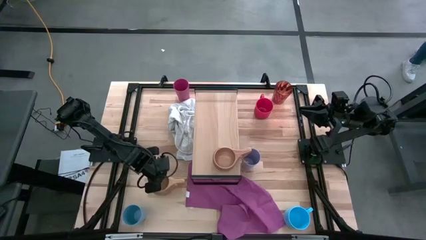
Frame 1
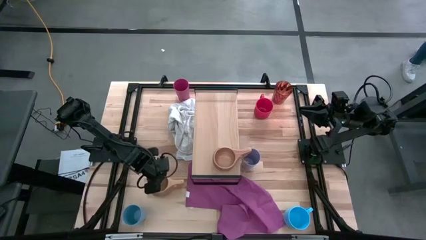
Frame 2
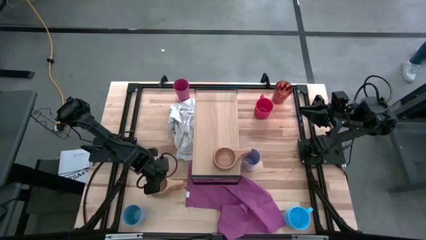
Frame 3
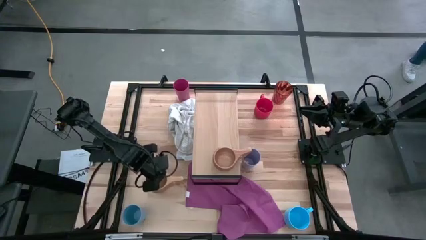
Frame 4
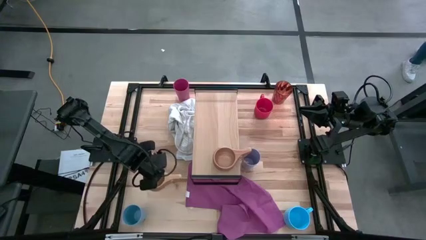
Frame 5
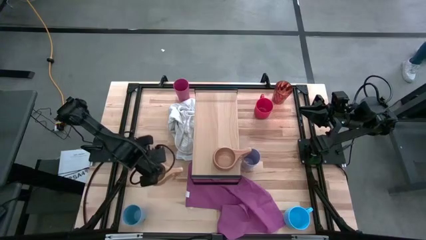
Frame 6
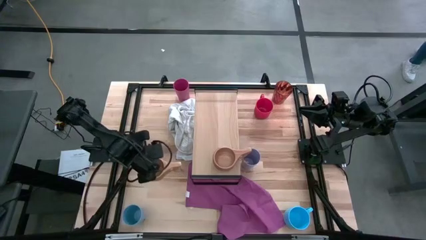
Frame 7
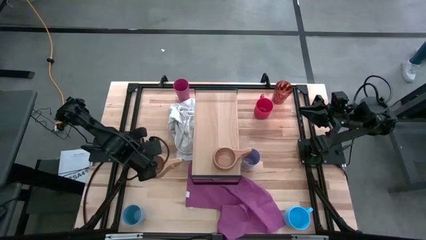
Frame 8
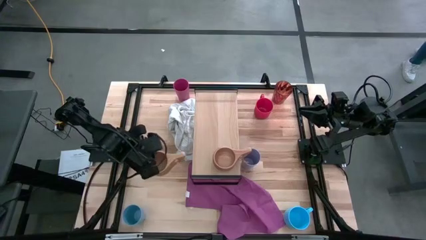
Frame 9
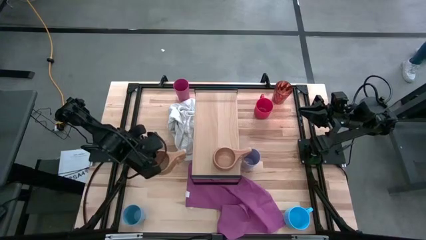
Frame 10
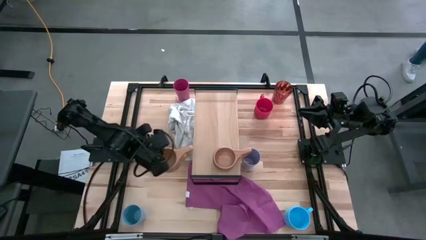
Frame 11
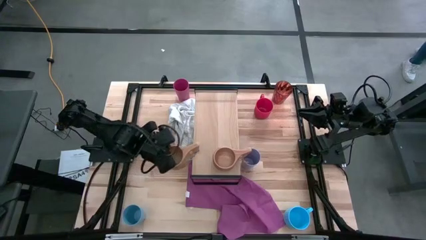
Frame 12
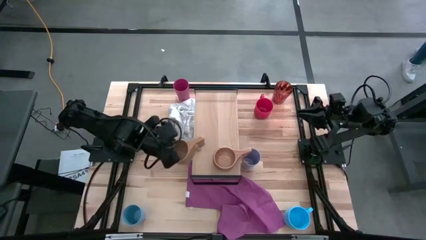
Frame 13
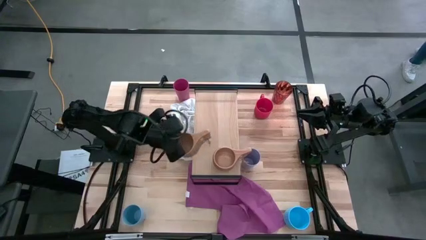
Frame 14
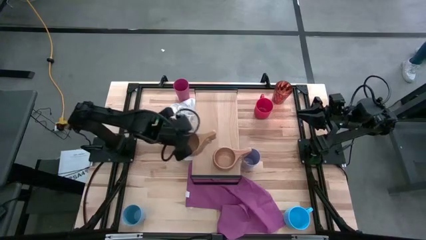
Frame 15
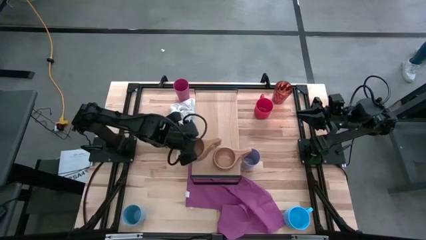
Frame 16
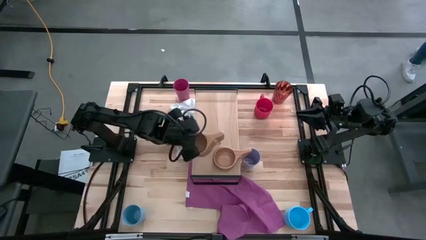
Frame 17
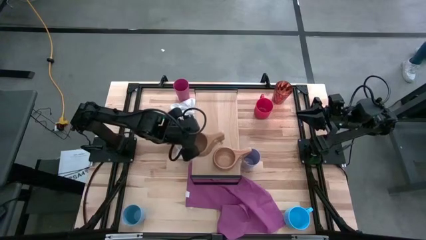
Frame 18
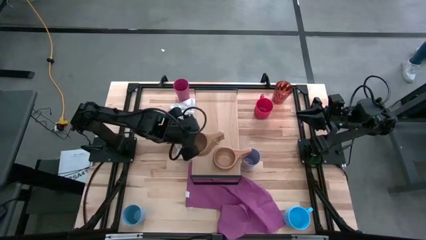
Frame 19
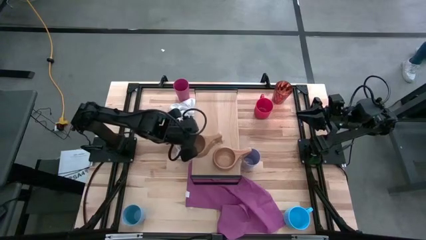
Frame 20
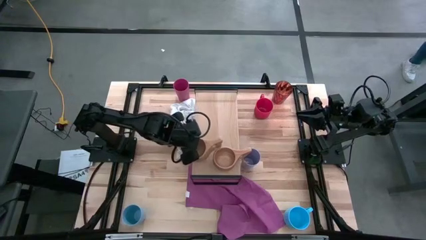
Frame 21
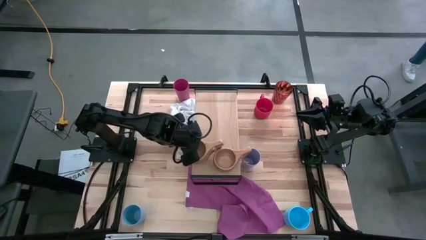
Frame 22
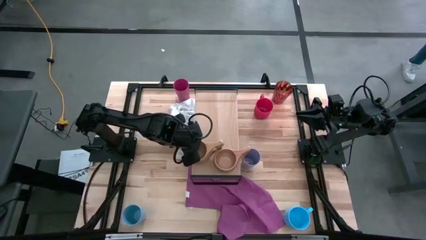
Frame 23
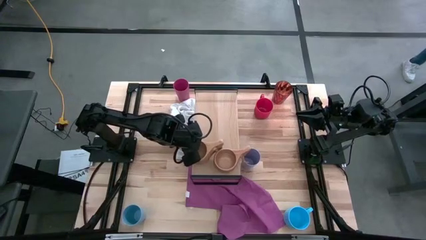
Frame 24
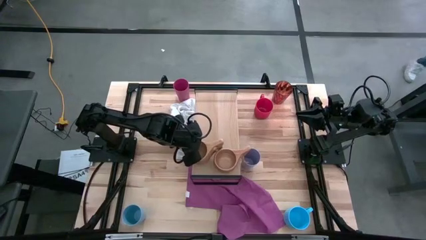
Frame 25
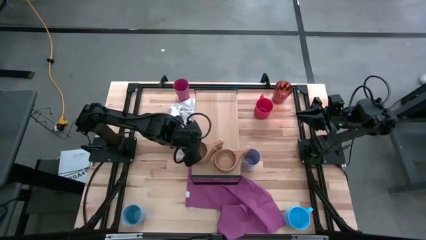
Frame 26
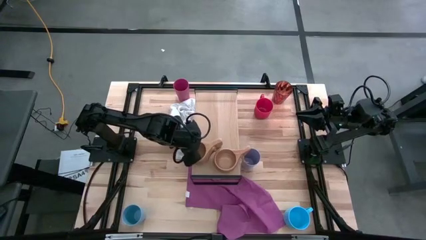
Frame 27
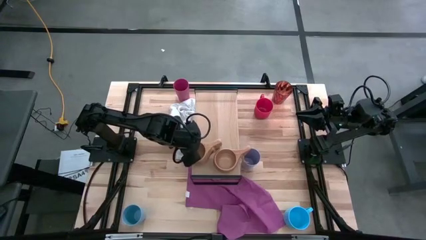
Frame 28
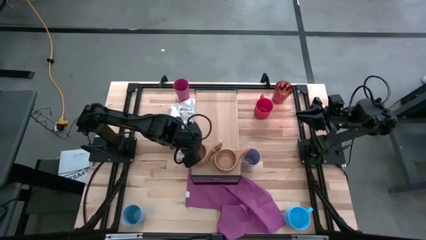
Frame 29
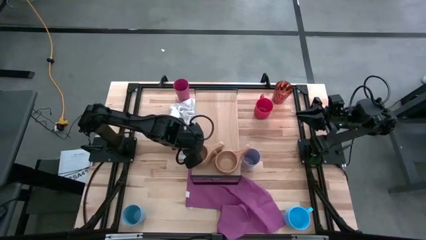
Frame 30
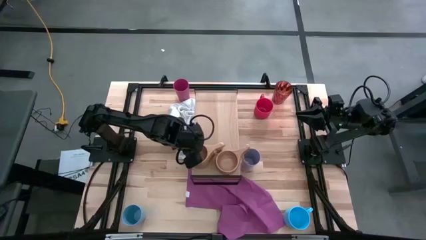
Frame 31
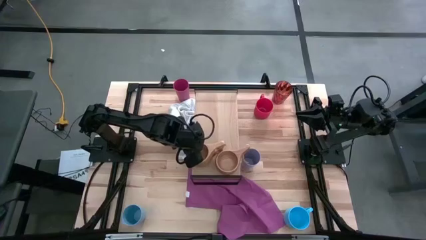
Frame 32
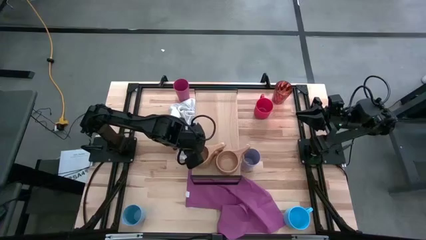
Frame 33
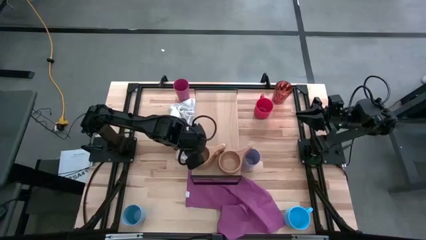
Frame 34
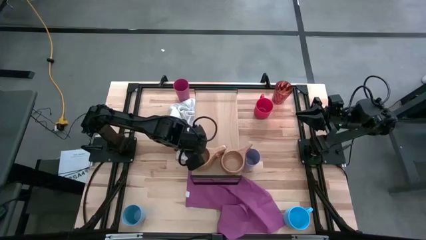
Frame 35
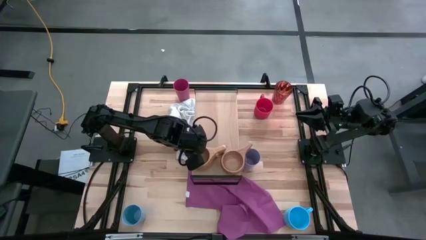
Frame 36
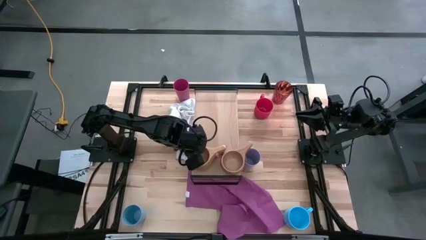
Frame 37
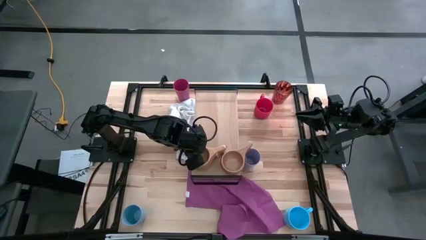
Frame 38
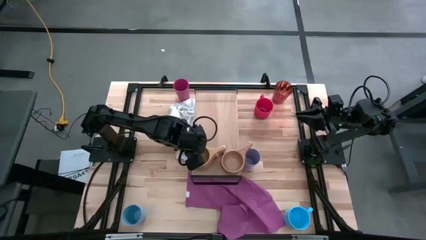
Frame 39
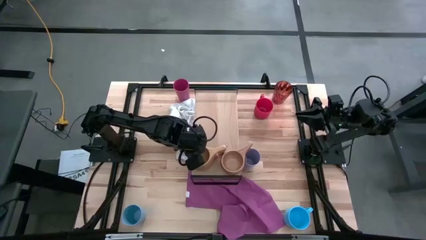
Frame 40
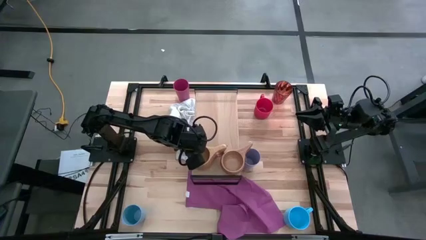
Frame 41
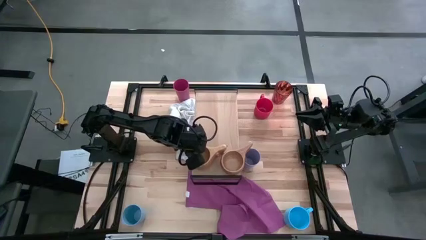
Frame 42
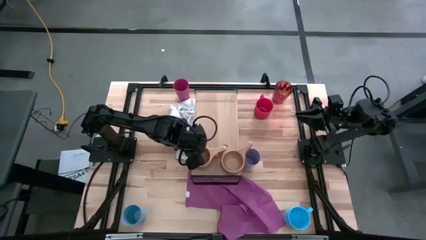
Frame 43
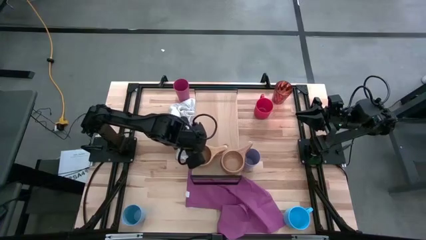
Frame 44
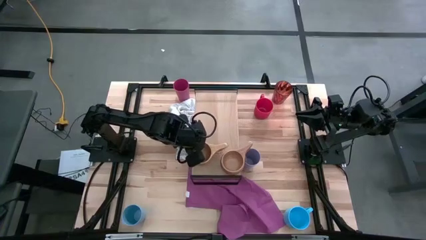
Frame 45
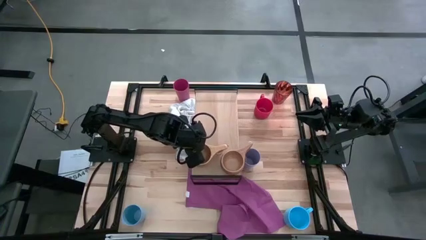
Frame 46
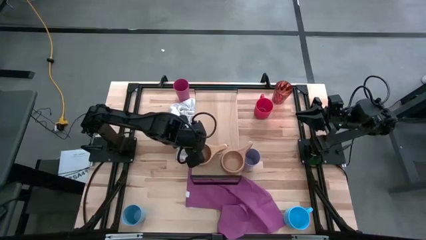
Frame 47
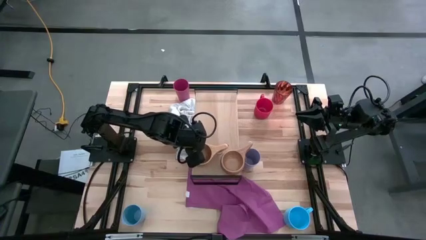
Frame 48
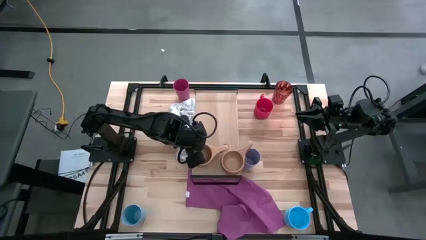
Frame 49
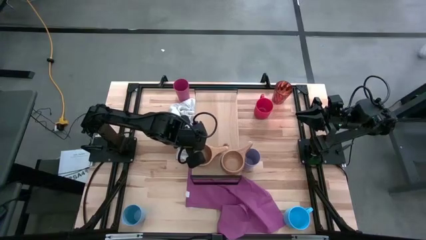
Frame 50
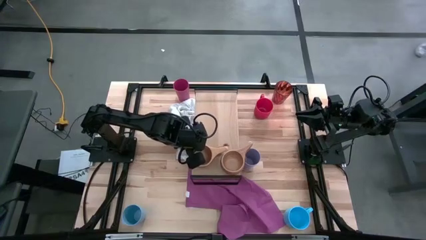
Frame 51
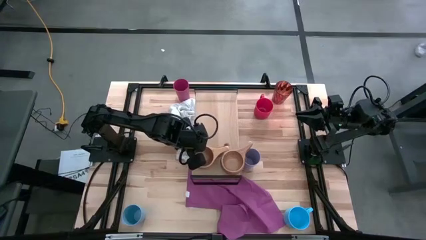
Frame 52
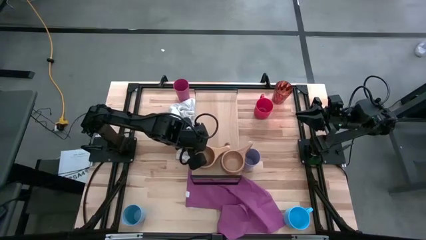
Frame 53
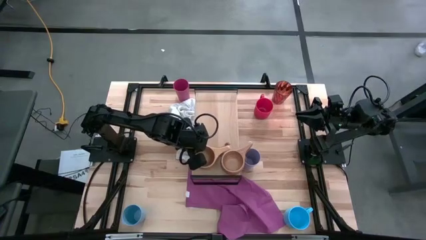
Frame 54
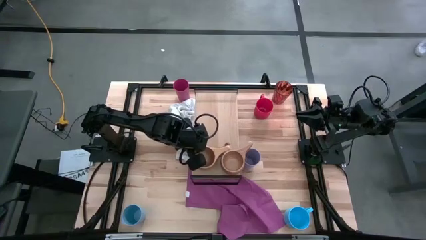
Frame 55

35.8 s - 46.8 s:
Task: Stack small to large cups/mugs on shelf
Put the brown mug on the shelf
